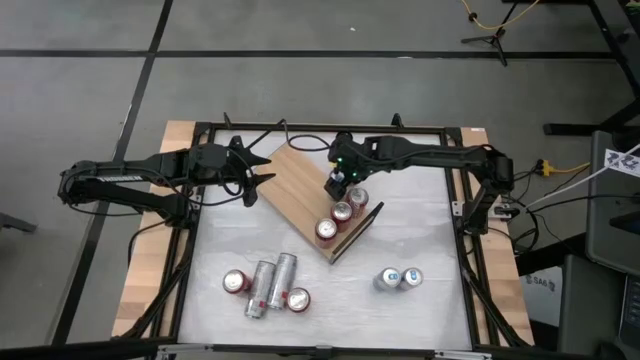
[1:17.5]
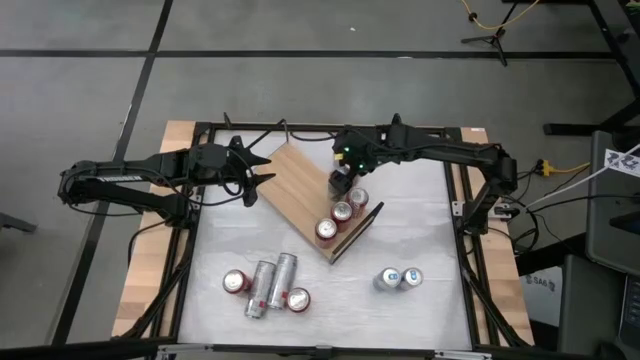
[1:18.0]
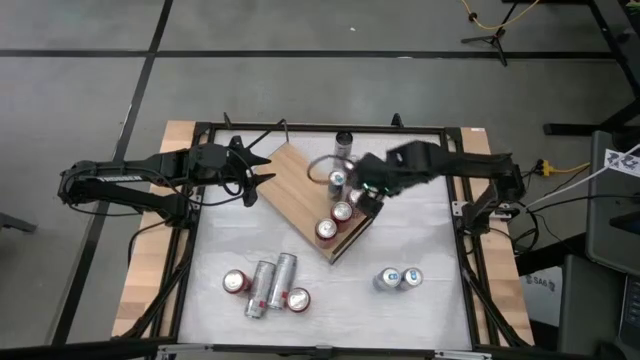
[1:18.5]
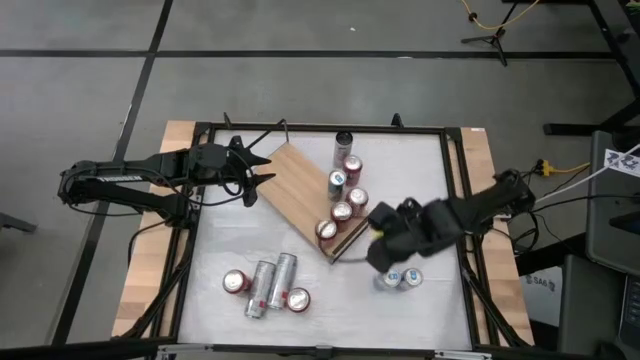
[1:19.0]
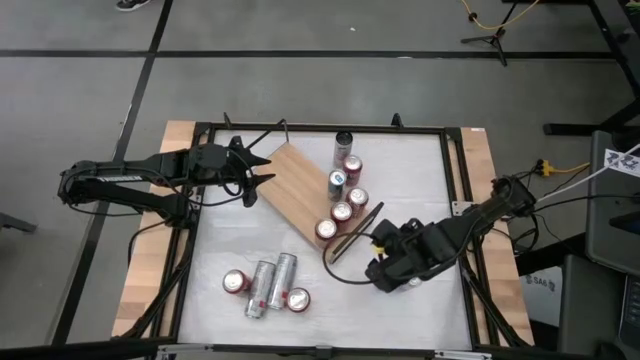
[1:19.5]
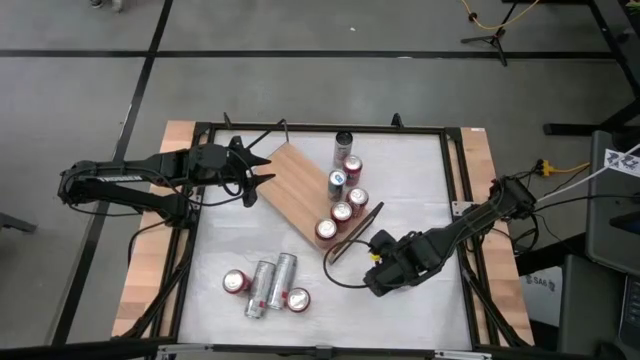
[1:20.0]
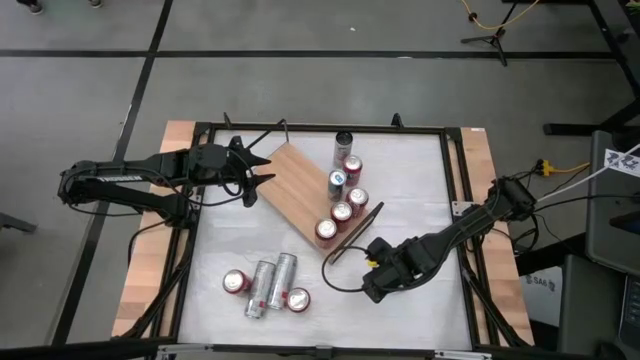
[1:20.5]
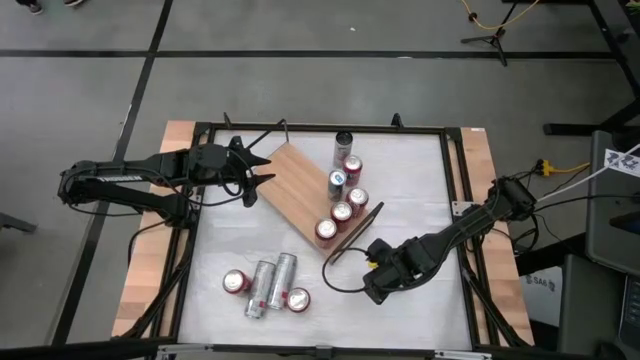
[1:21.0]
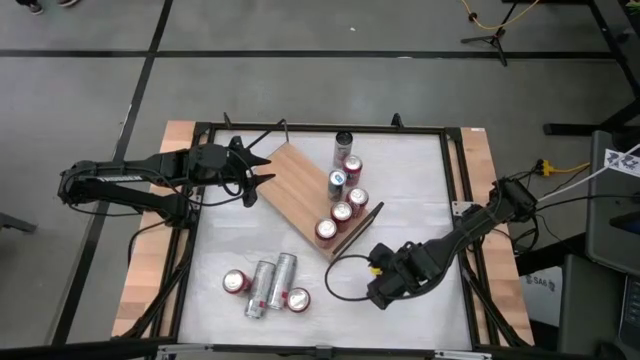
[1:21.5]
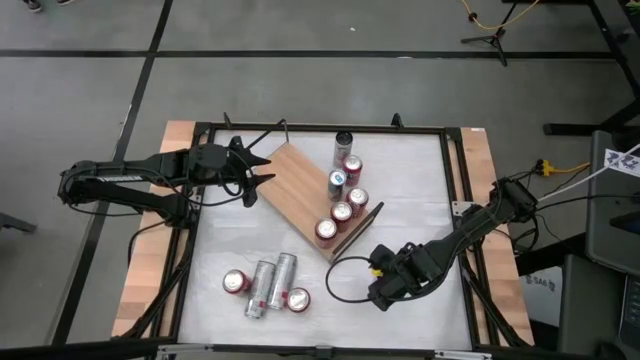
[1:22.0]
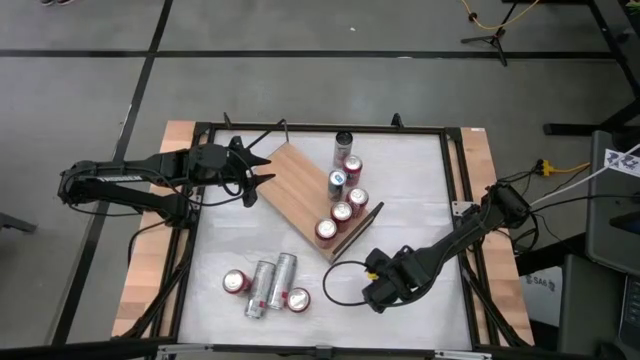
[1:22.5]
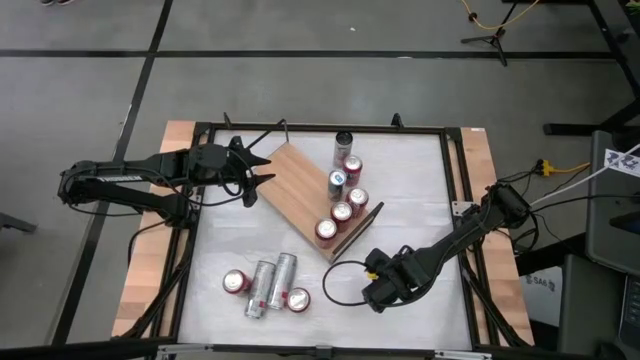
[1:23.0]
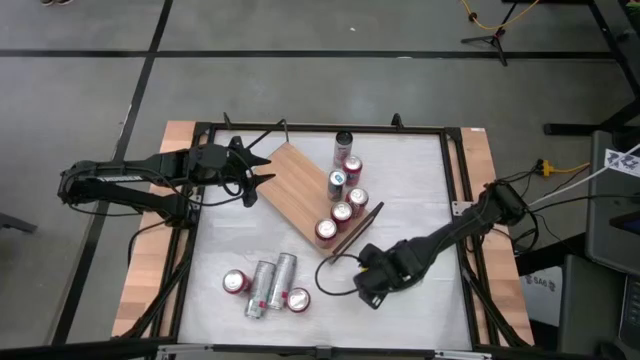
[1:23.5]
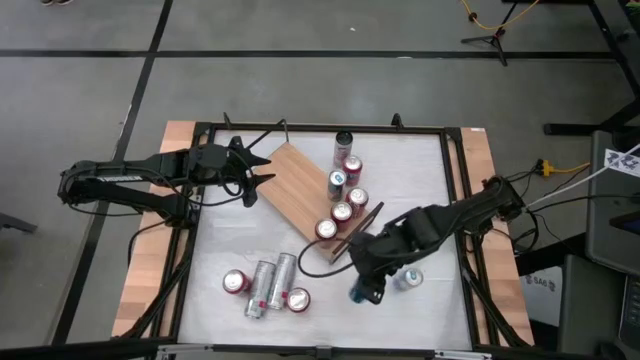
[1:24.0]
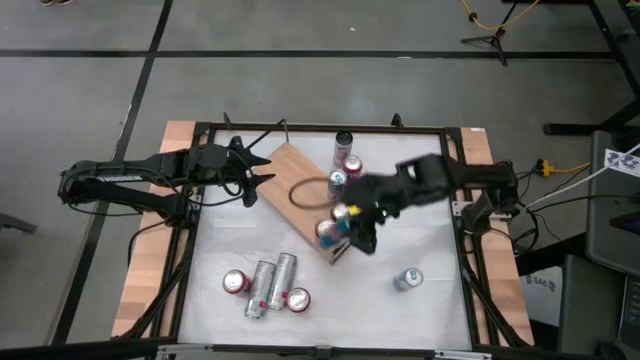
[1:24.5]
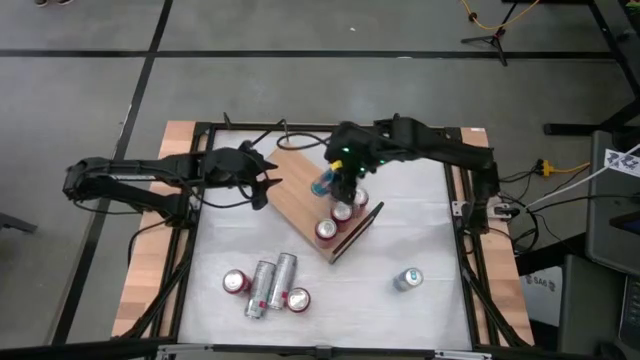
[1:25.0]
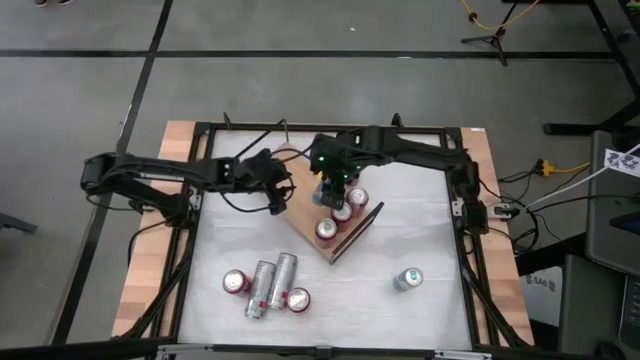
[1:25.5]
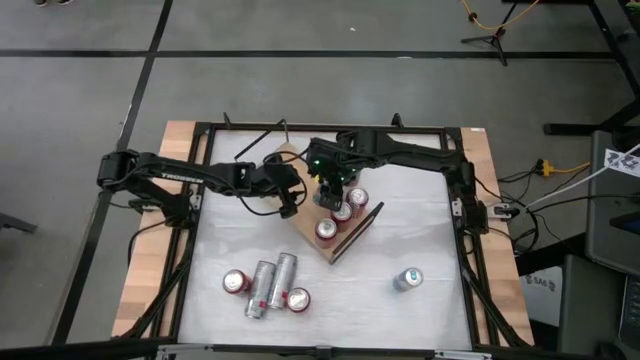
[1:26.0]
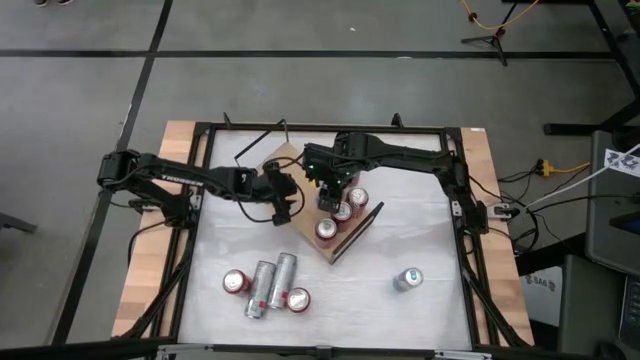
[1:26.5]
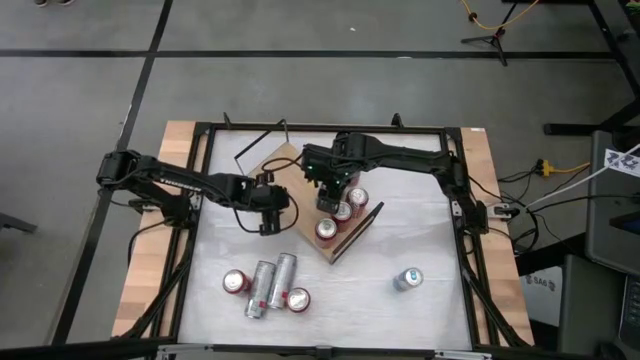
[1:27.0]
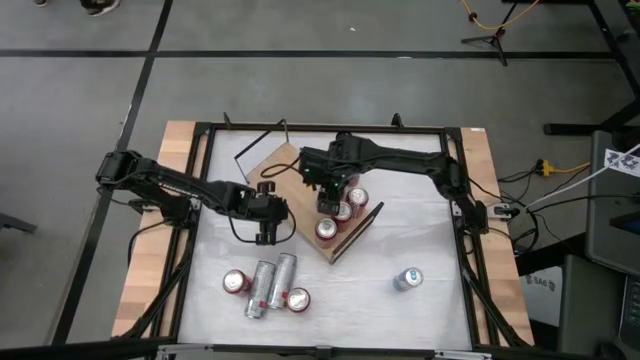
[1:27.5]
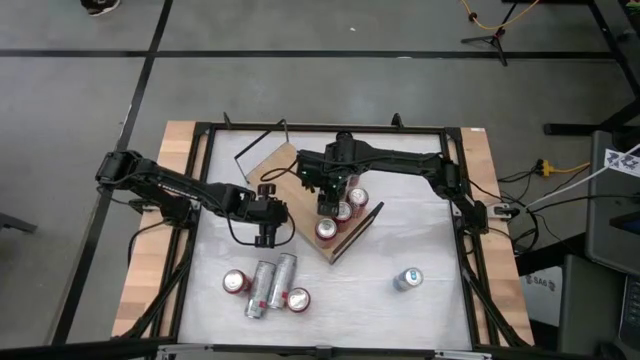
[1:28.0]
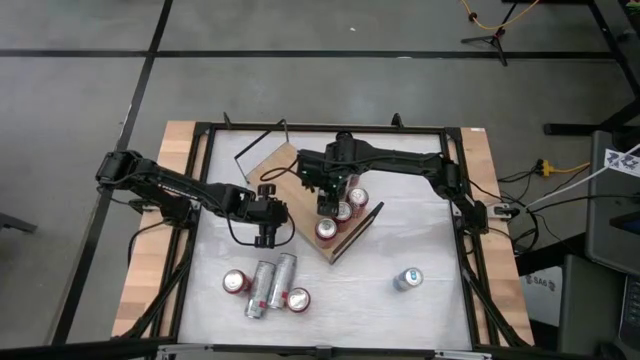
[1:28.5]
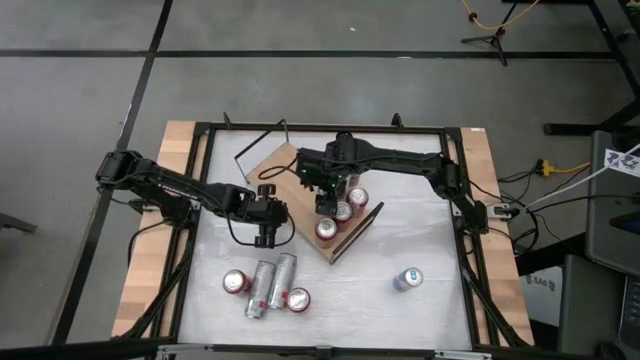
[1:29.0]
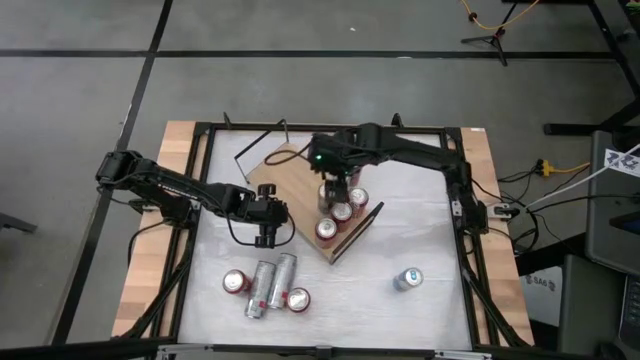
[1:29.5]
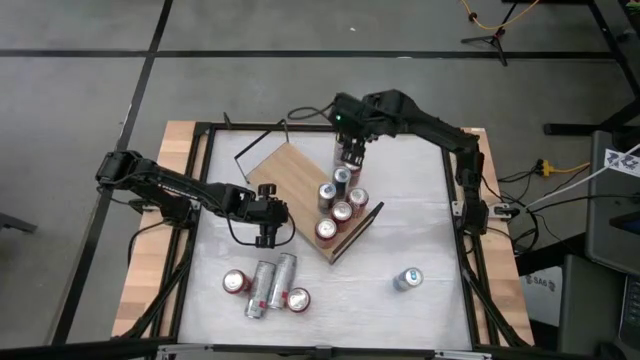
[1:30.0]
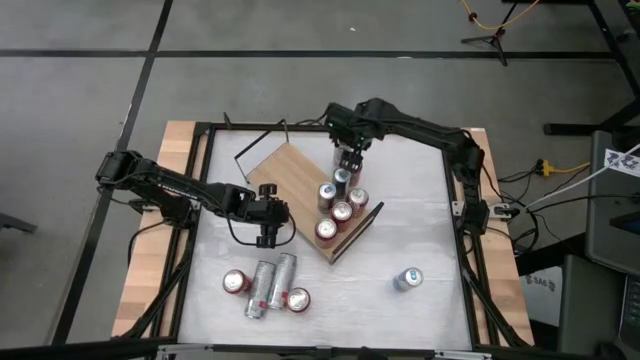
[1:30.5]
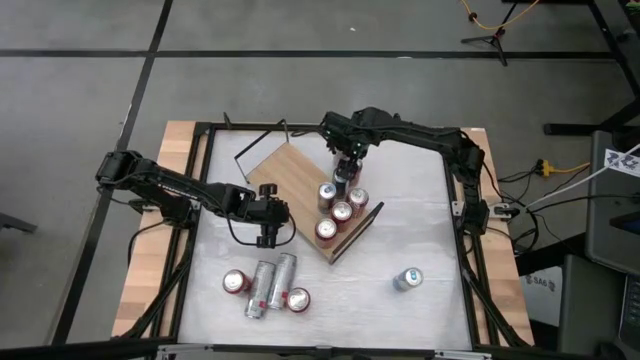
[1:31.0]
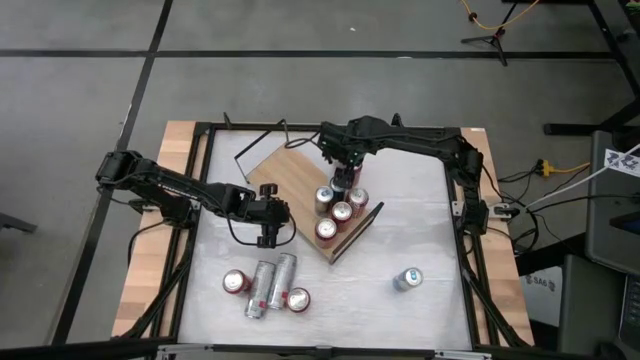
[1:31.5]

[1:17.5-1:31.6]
Task: Place canned beverage on shelf
Put the left blue soda can on the shelf aligned with the other blue soda can

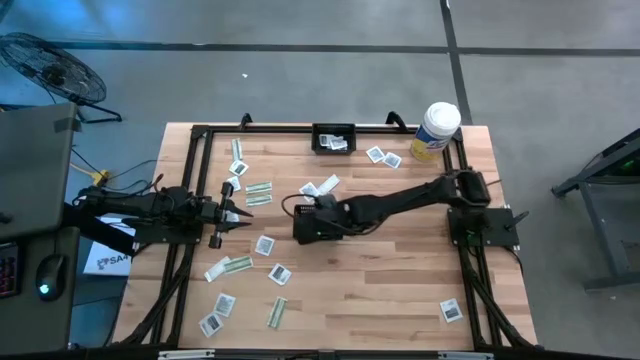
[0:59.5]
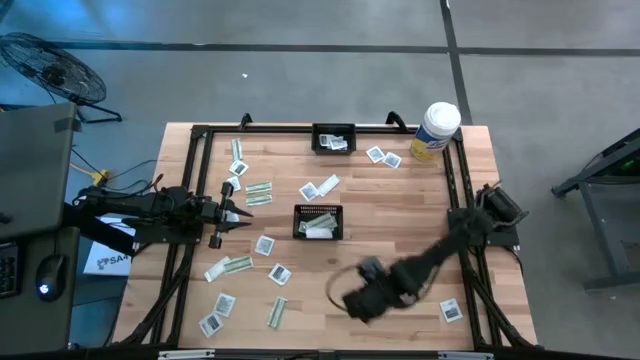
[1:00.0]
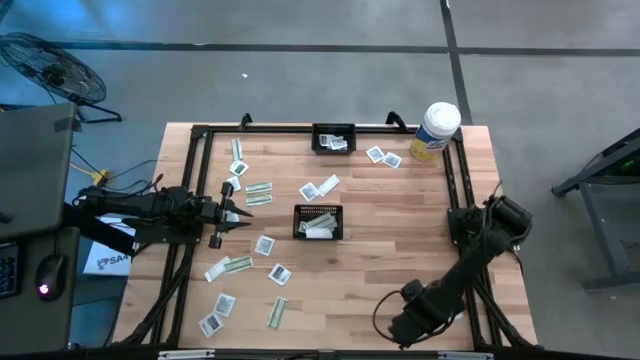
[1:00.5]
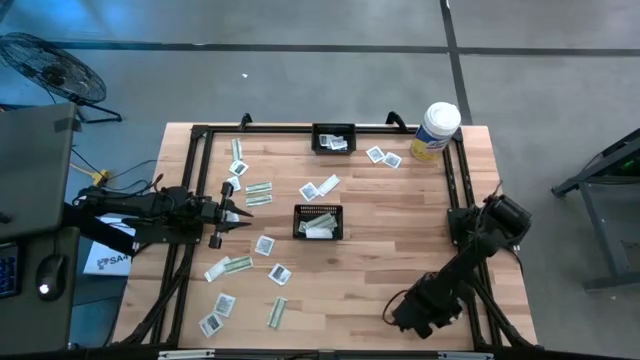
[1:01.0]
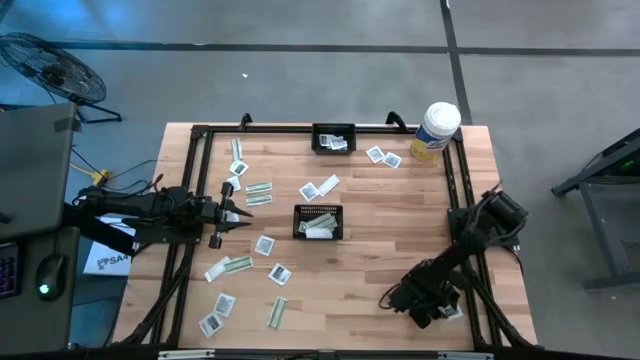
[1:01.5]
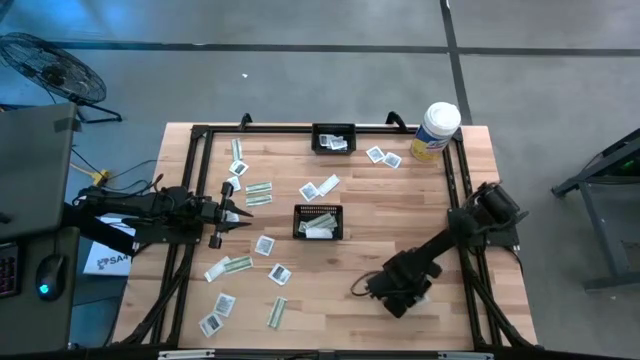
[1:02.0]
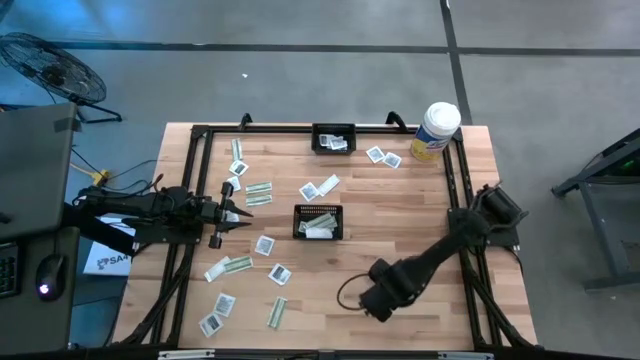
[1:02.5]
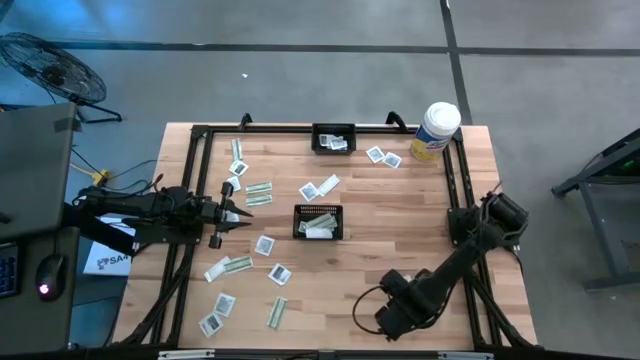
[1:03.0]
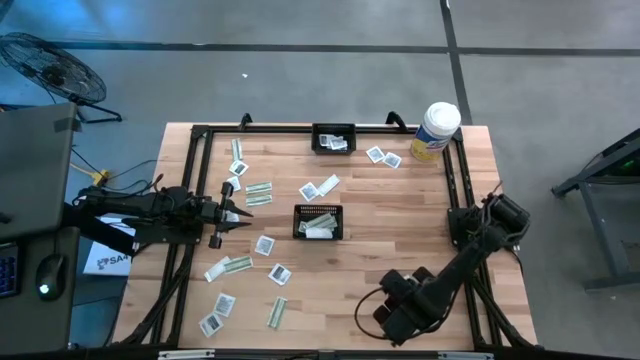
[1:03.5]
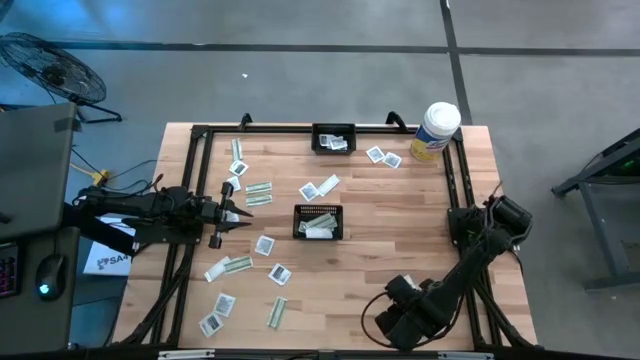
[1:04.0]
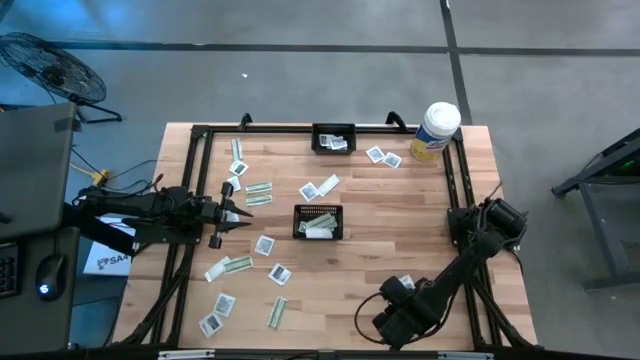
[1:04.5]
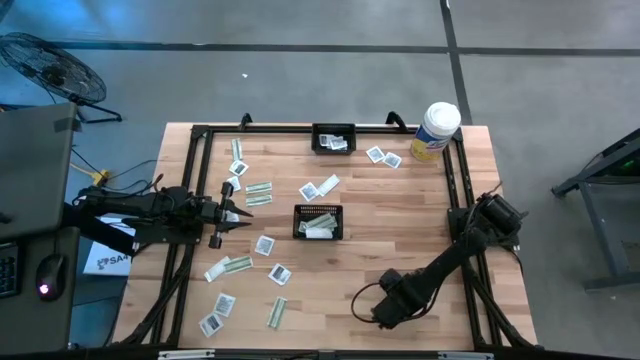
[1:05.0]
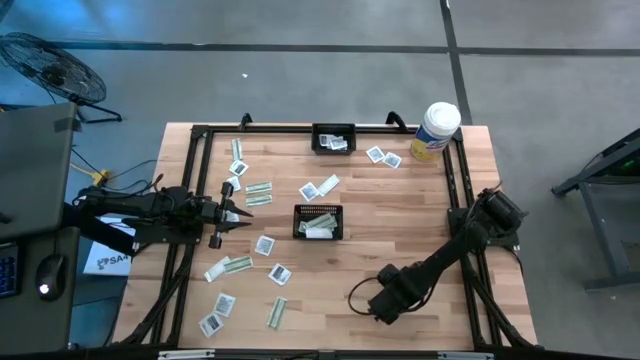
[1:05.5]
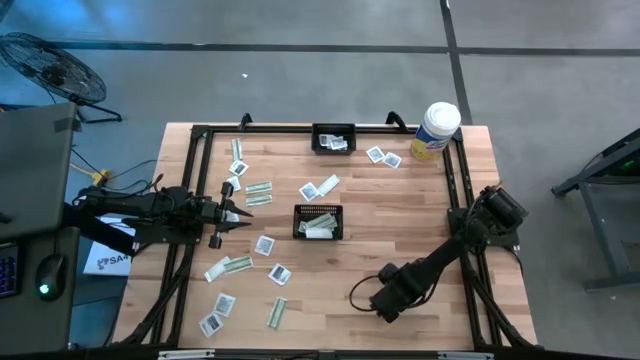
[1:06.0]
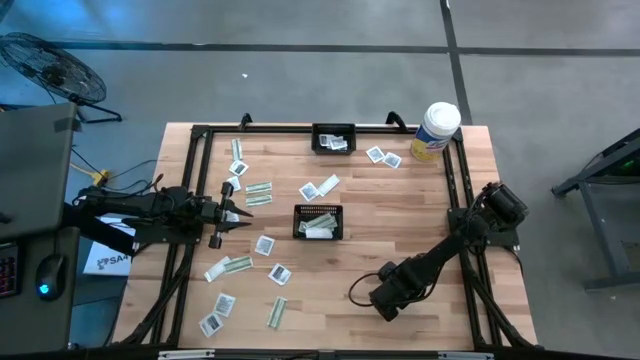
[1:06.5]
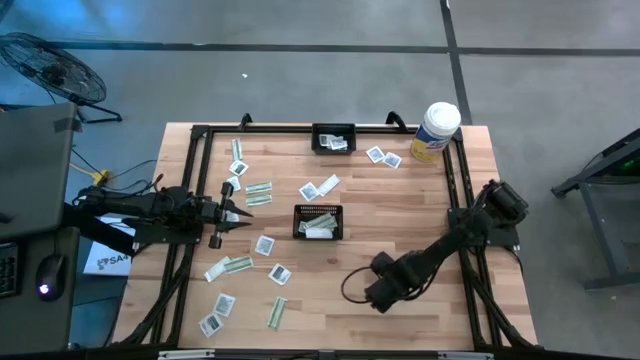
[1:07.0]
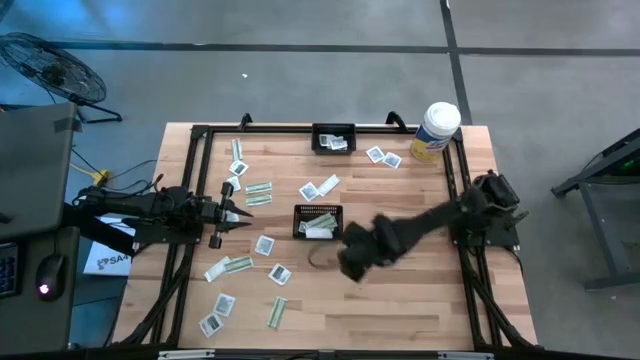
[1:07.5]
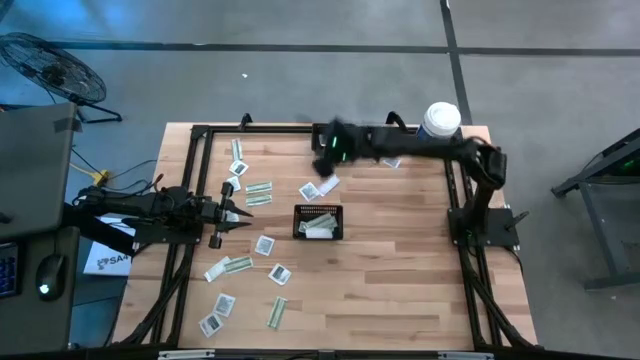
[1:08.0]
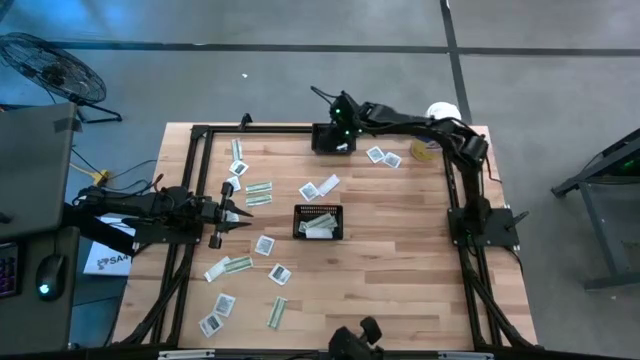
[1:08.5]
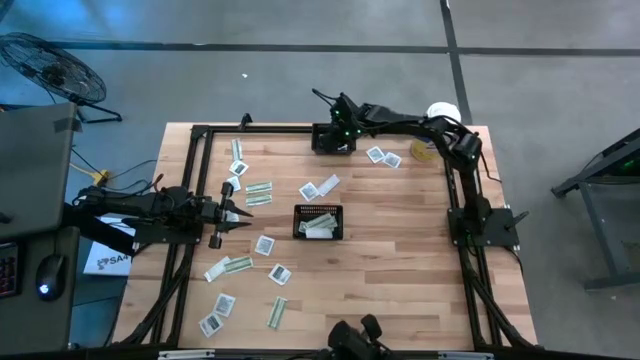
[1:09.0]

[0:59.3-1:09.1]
Task: Pick & Place First Aid Supplies
Put the towelette pack into the top black basket
